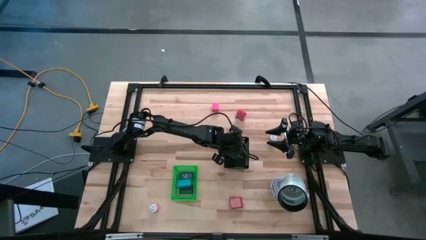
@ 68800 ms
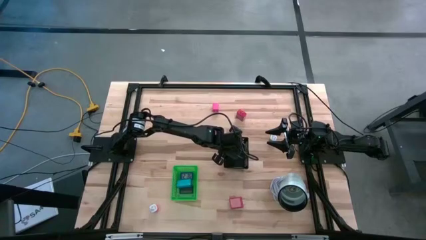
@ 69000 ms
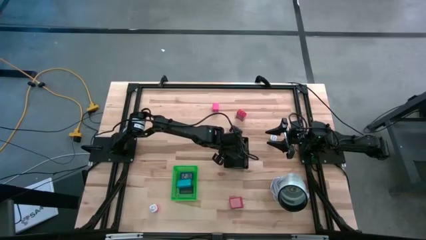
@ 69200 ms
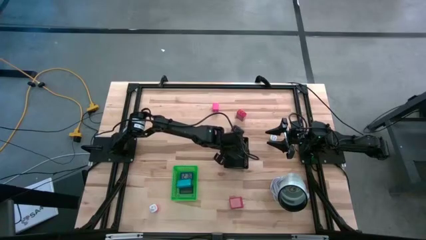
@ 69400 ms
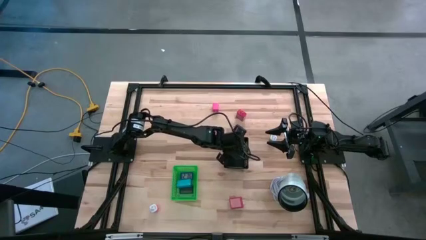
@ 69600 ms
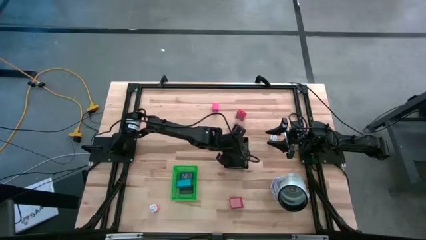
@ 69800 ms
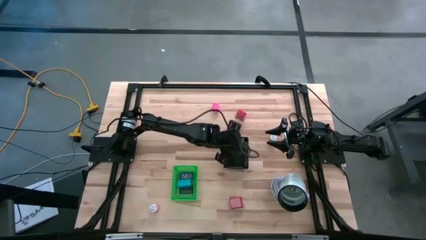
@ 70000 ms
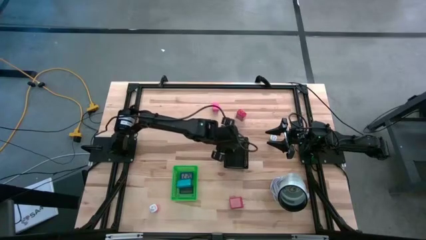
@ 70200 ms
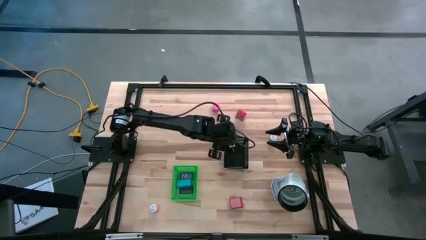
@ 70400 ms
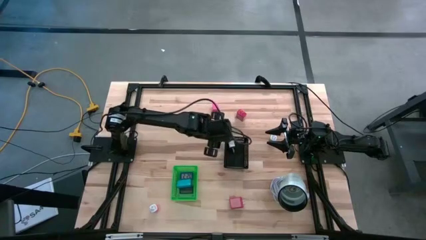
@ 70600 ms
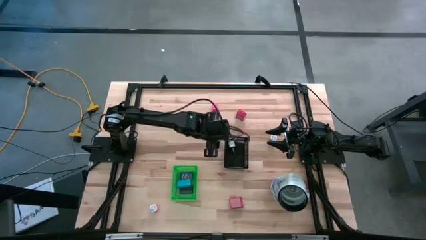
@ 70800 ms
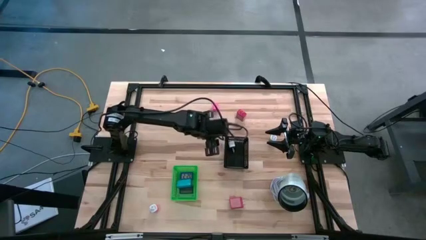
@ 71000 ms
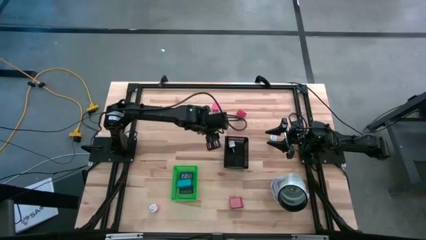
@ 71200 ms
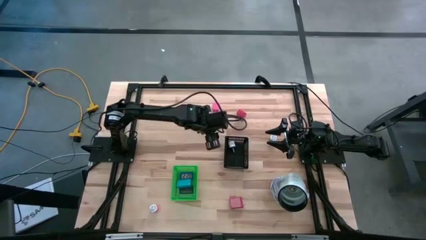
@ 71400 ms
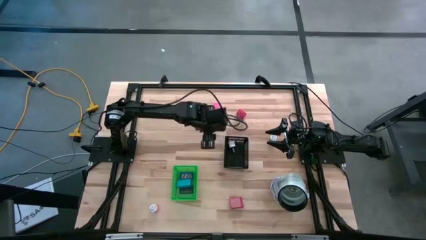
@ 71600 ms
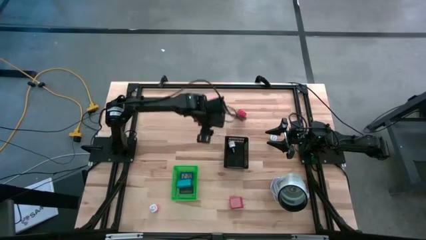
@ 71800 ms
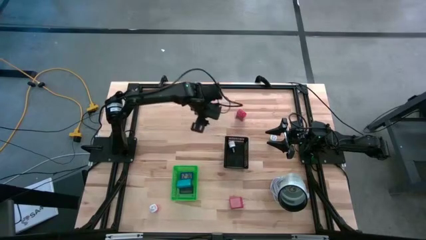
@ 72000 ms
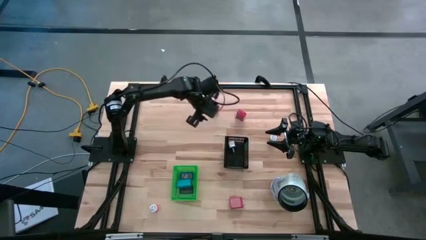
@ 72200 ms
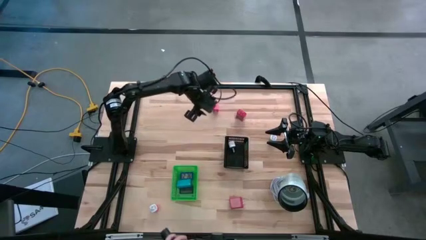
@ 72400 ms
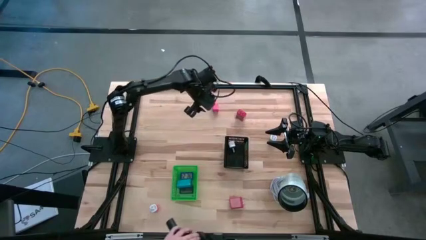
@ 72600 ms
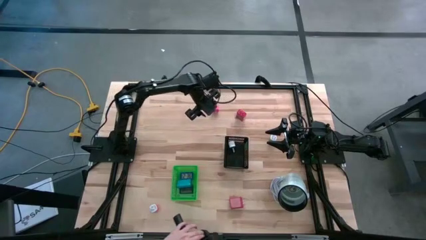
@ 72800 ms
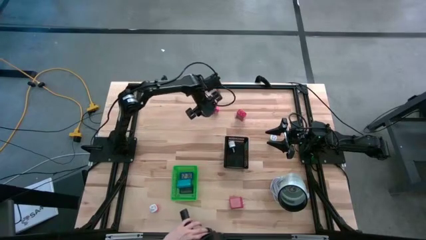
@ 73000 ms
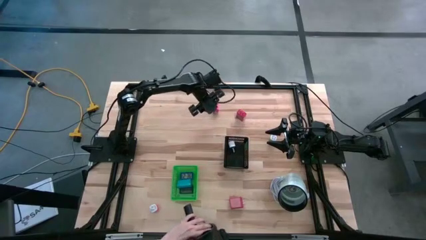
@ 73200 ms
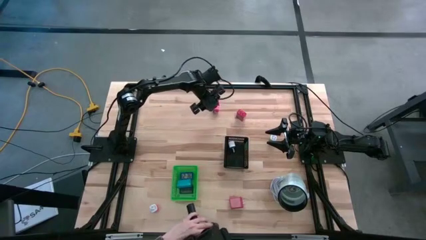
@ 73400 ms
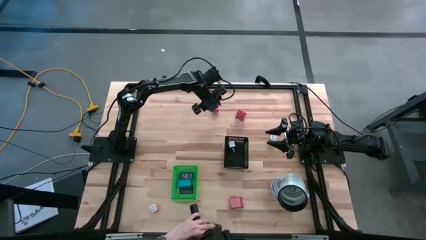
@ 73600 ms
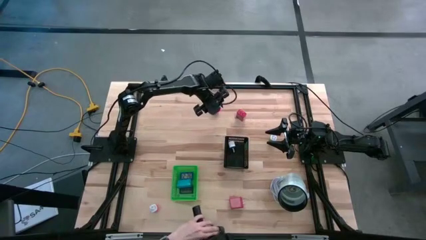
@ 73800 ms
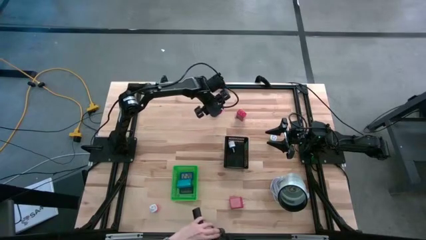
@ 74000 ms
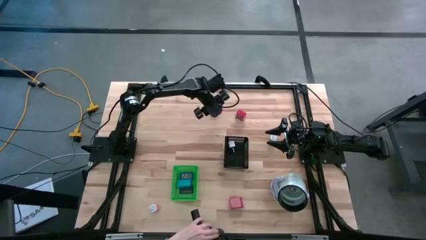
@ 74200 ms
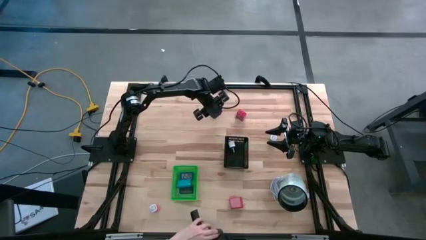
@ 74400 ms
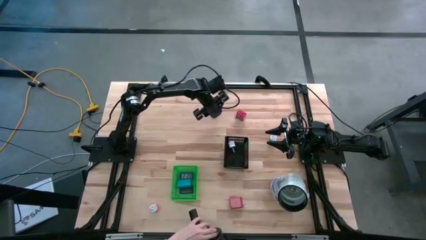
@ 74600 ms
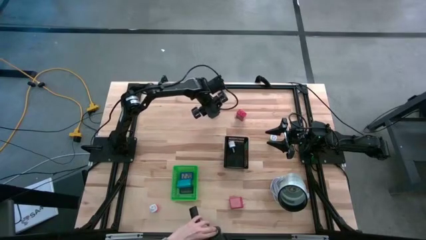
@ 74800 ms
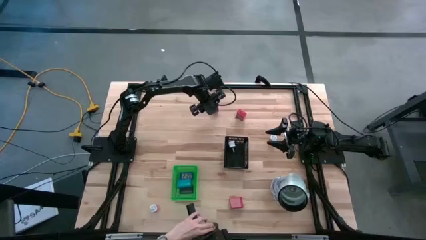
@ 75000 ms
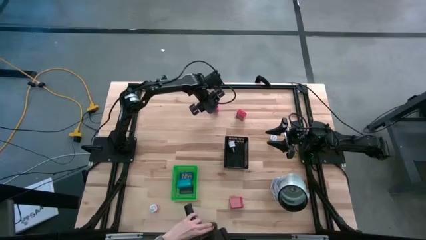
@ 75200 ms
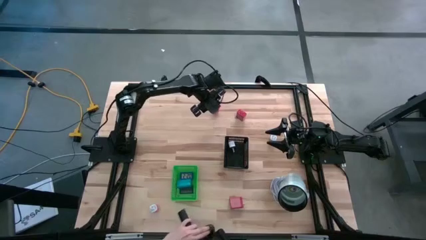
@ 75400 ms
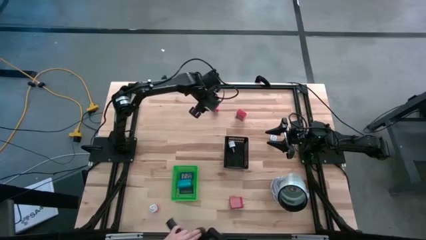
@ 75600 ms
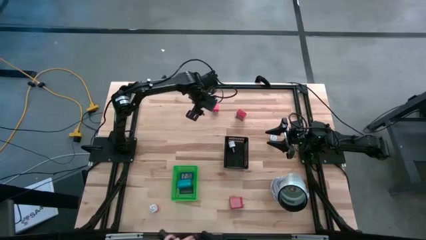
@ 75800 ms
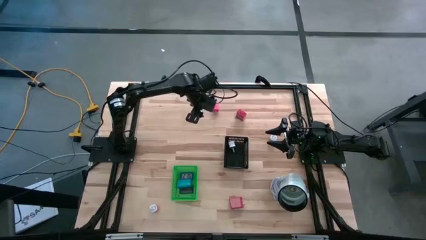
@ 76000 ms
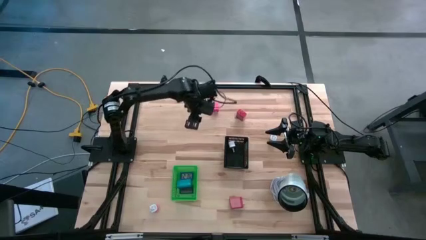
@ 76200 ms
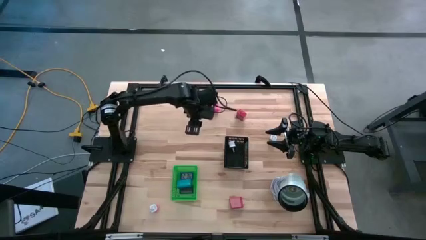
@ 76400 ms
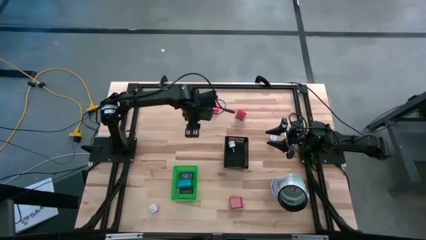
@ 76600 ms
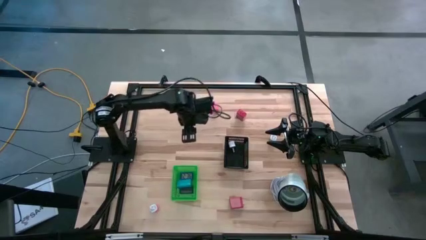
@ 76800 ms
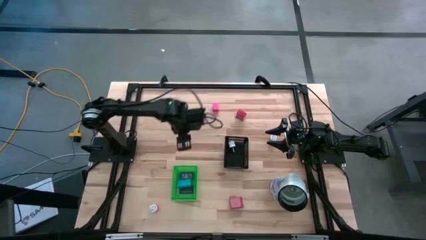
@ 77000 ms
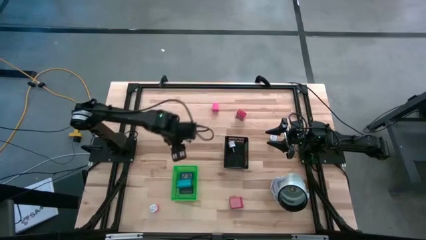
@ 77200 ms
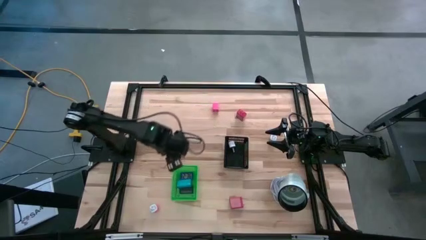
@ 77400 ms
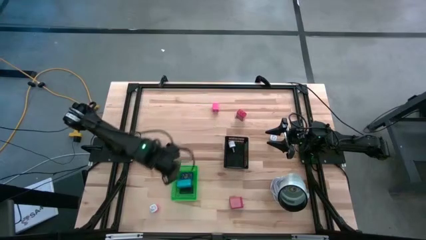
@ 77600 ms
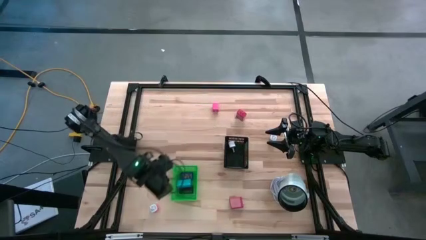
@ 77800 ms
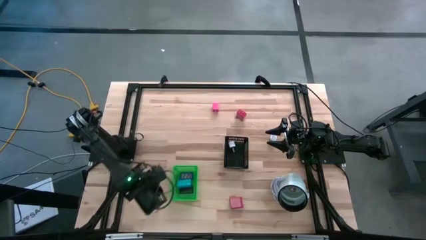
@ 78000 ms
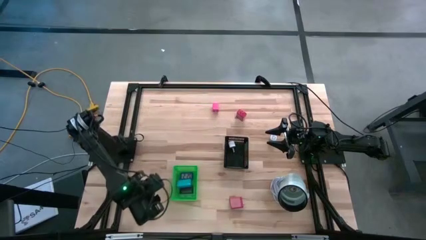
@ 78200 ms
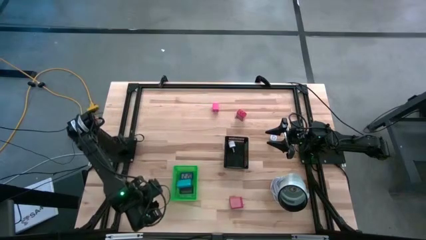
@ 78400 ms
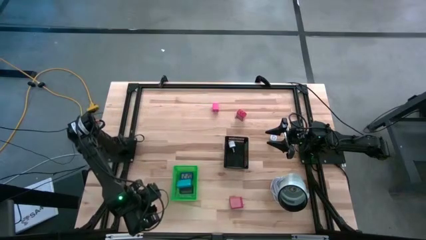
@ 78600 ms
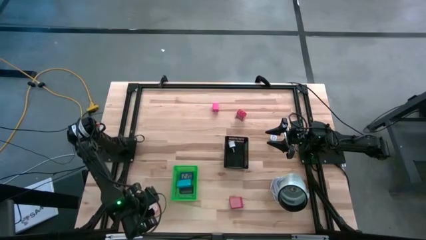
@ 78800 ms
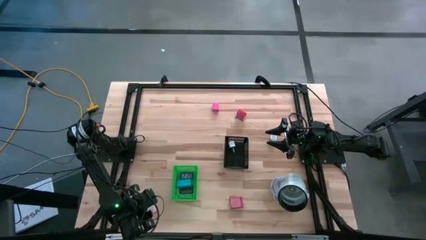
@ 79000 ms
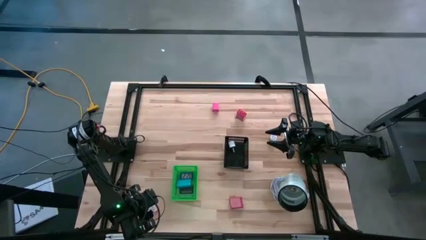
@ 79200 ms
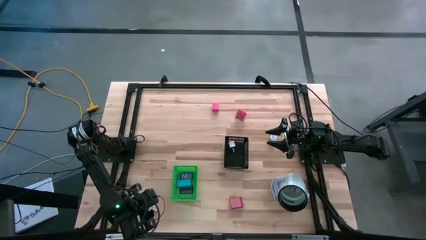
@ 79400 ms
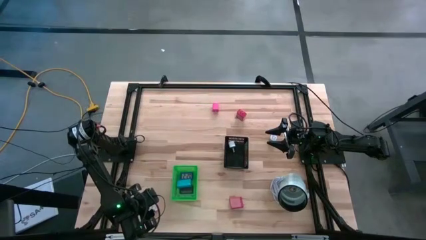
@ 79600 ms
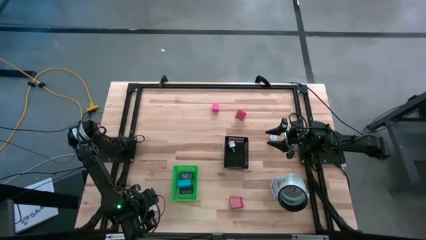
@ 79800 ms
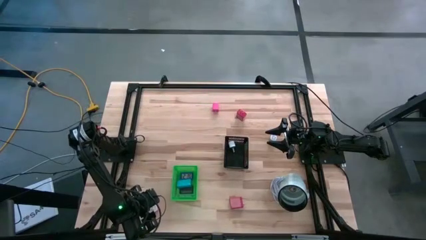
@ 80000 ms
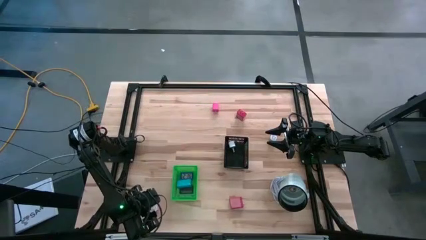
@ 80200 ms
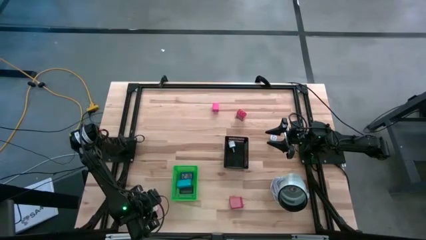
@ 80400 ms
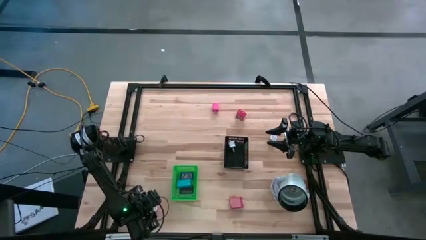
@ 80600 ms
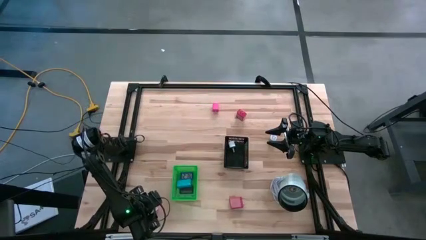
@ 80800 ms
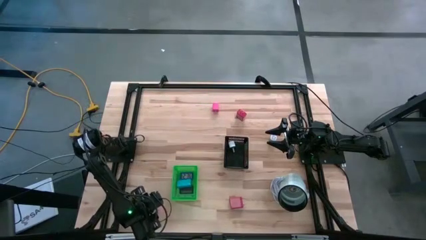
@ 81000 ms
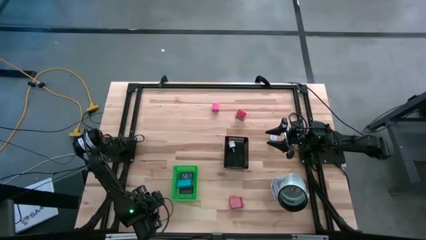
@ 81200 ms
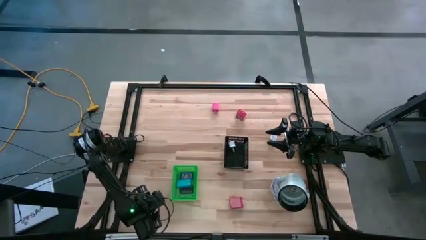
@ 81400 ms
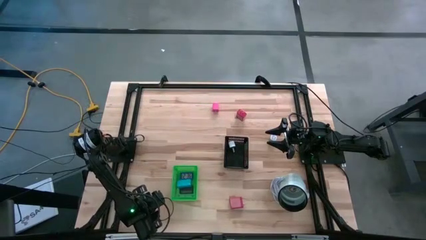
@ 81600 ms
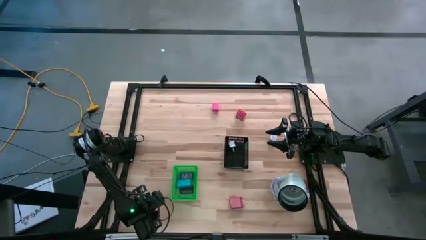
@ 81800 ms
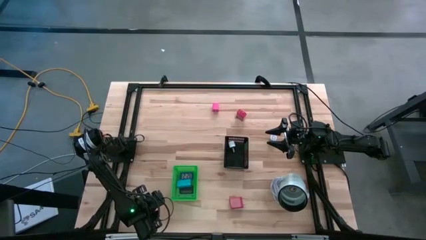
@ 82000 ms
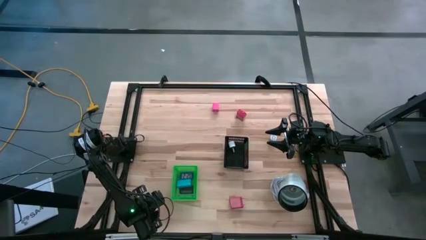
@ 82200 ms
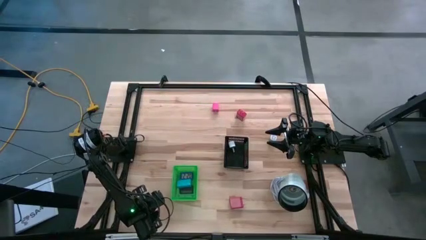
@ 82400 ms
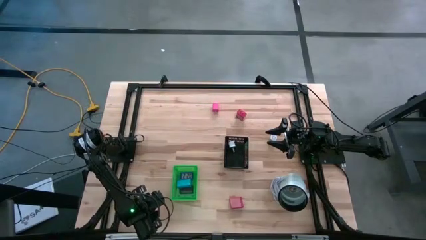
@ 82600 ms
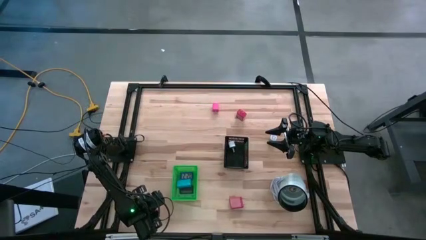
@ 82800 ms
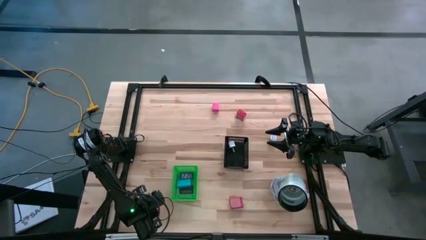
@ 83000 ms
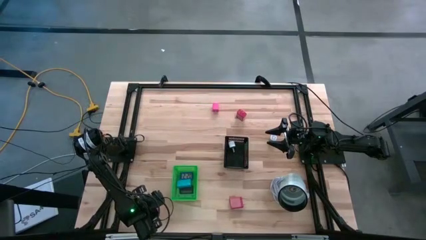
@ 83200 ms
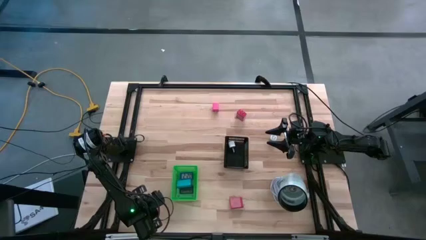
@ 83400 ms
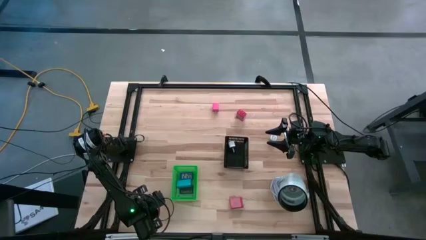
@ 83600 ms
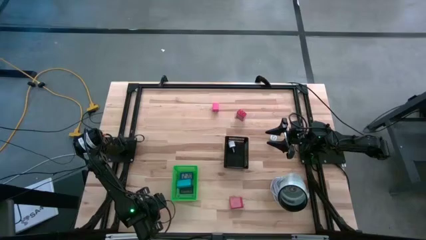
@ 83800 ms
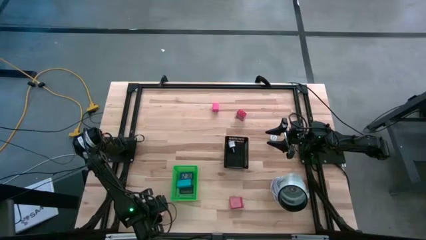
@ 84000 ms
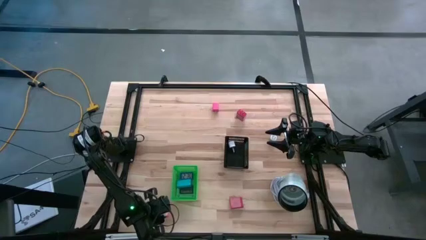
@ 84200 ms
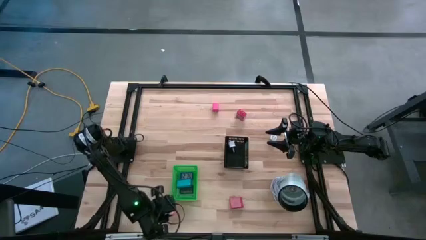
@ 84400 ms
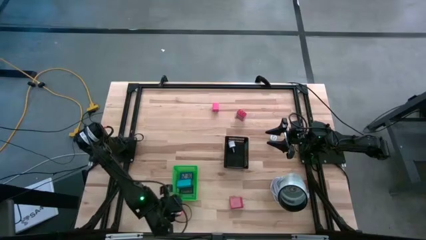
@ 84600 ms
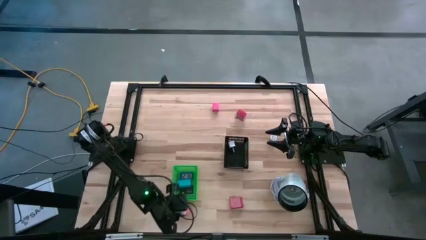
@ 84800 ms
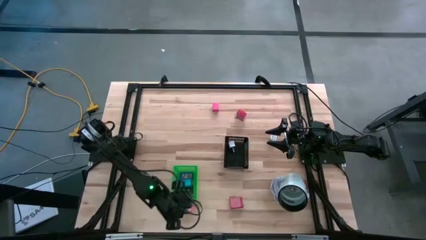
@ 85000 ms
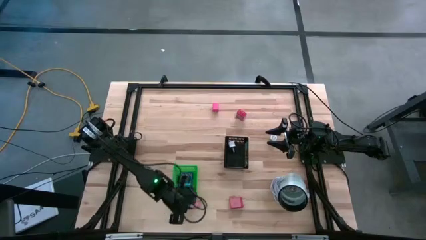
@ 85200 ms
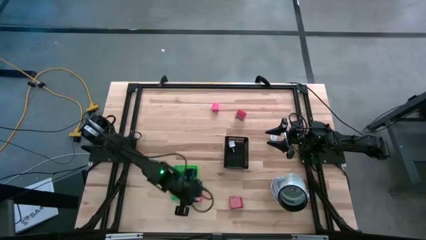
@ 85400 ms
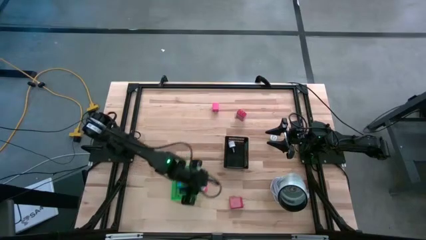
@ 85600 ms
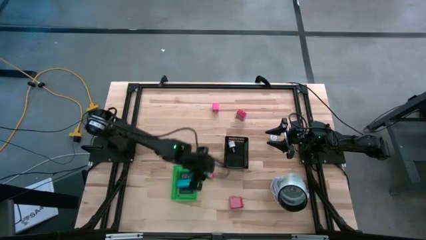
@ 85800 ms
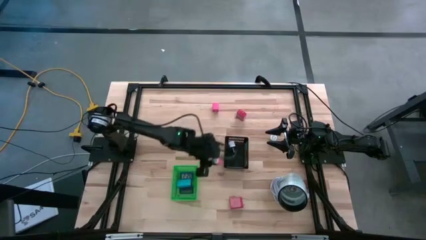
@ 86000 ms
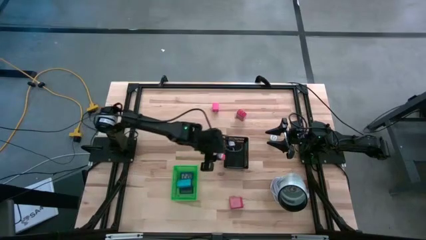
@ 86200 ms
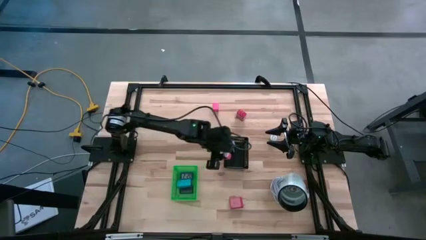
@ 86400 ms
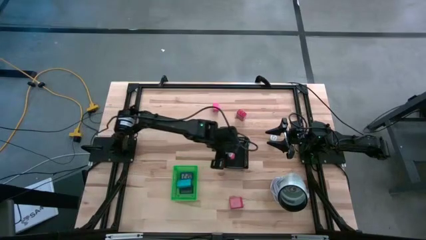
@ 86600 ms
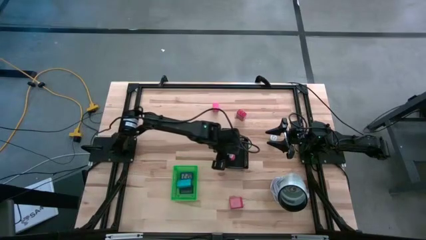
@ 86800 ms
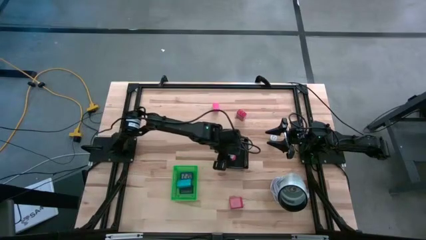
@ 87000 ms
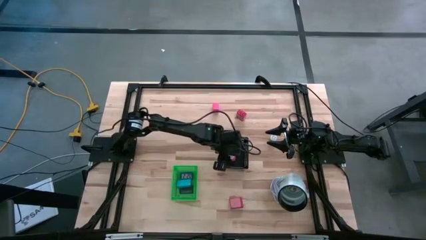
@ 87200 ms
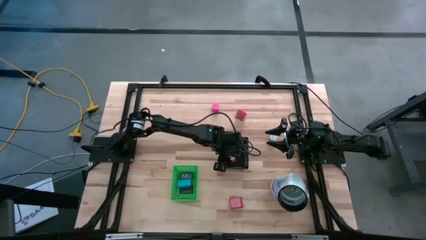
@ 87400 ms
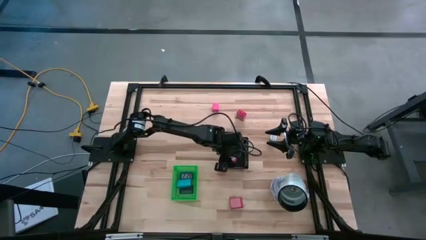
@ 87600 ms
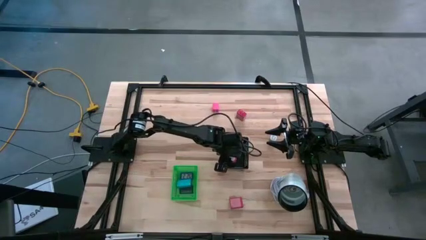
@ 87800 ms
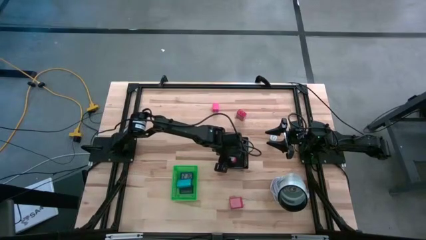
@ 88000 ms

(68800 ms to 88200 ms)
Task: Pick & Place Office items
Put the bottom orange charger adapter into the black bin
